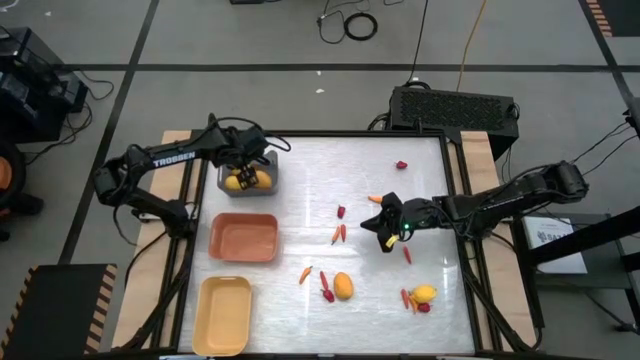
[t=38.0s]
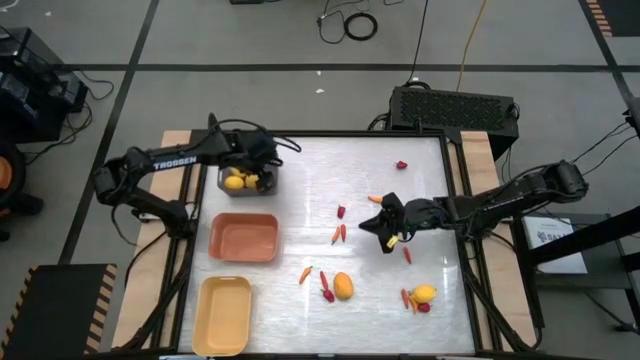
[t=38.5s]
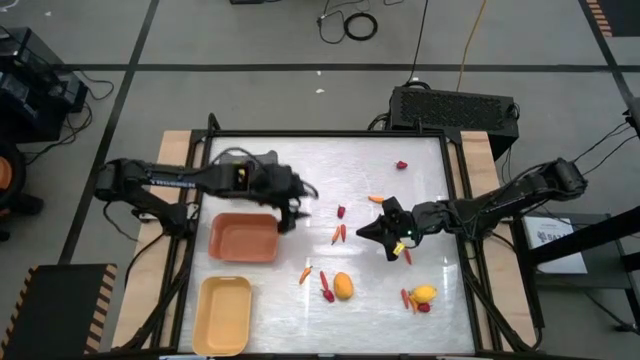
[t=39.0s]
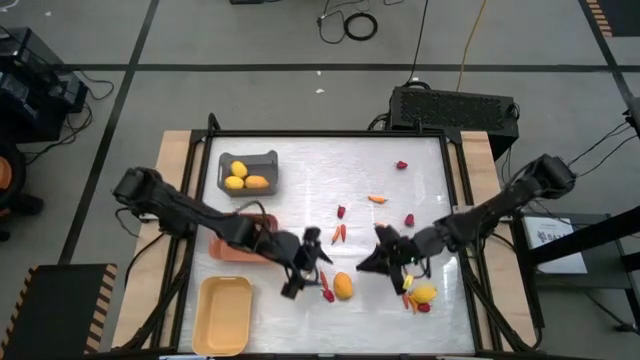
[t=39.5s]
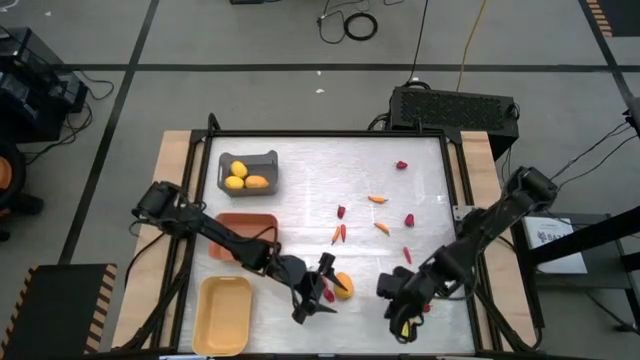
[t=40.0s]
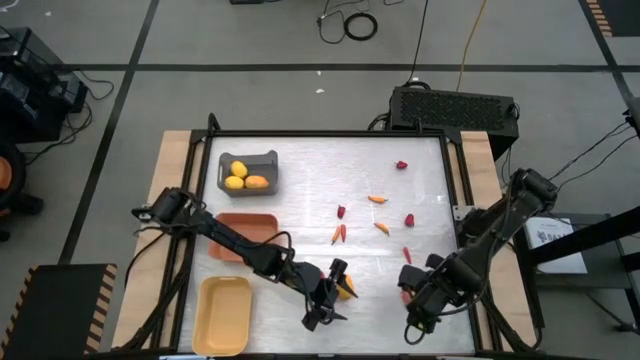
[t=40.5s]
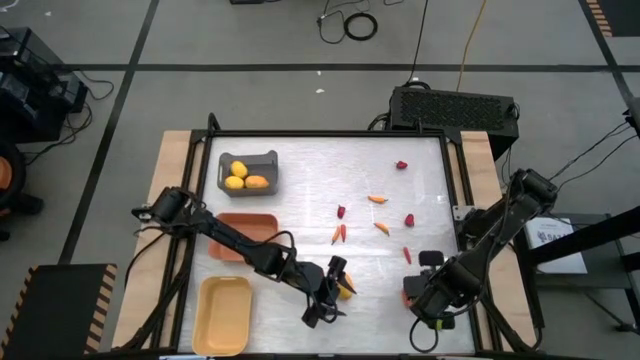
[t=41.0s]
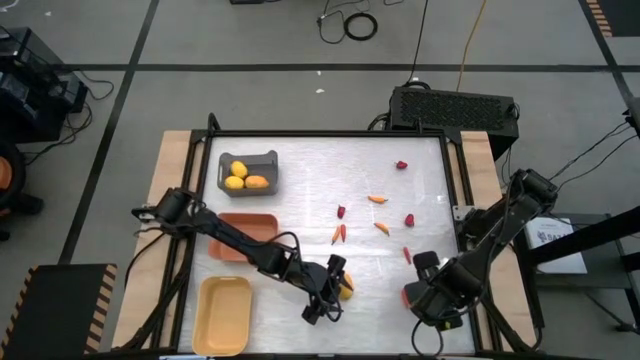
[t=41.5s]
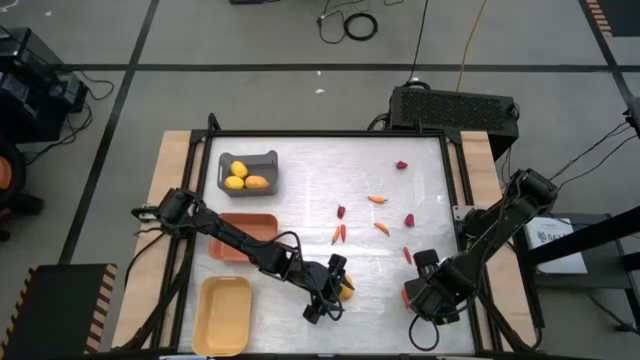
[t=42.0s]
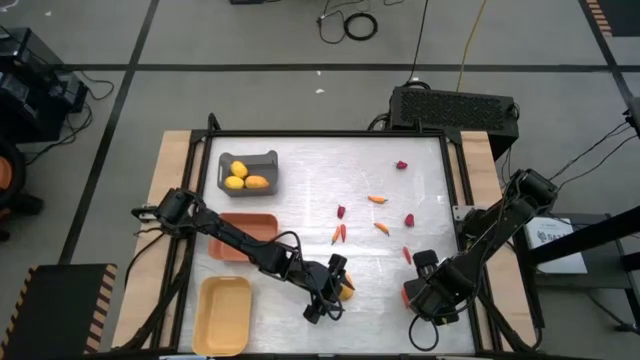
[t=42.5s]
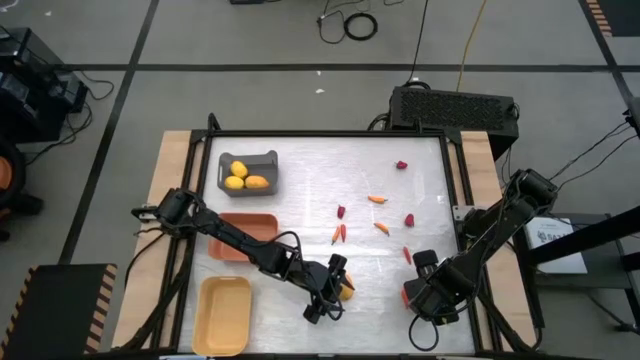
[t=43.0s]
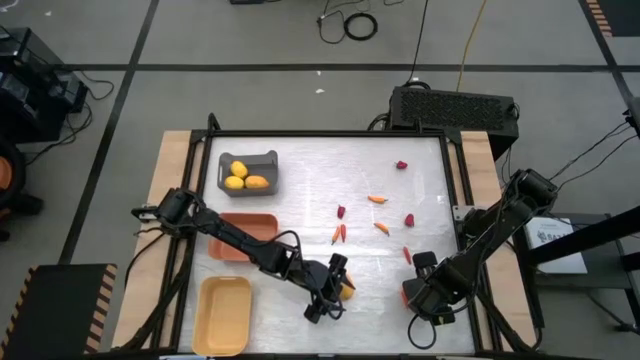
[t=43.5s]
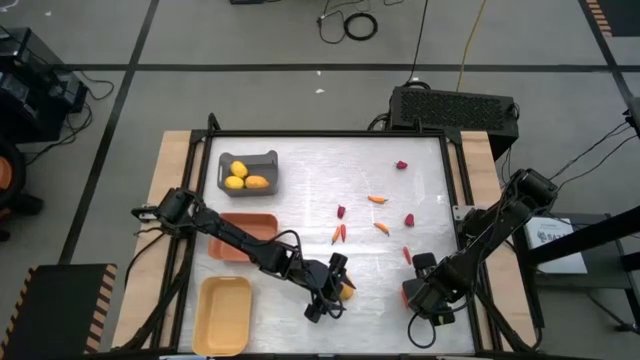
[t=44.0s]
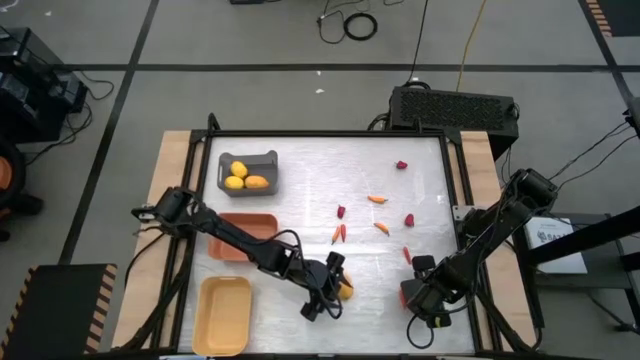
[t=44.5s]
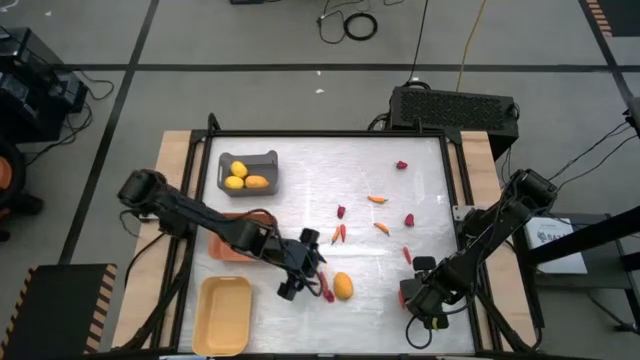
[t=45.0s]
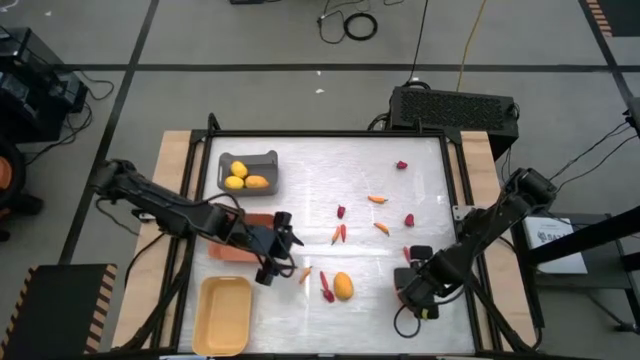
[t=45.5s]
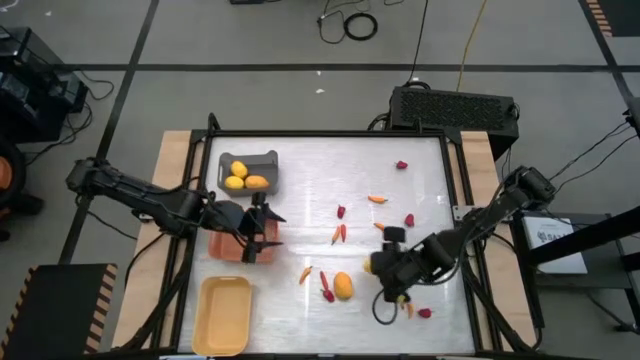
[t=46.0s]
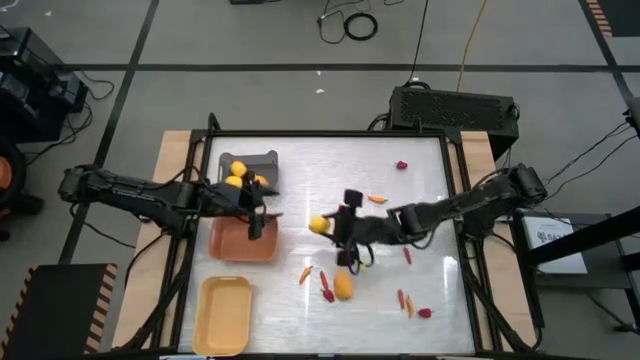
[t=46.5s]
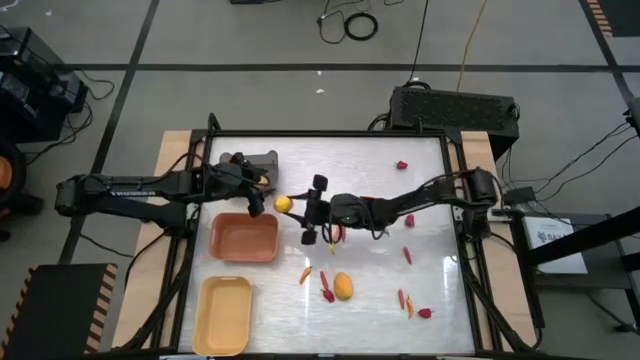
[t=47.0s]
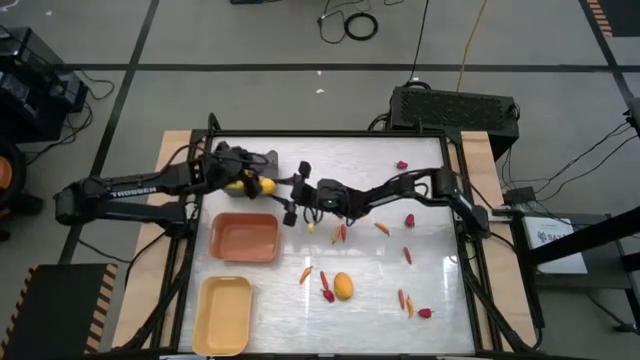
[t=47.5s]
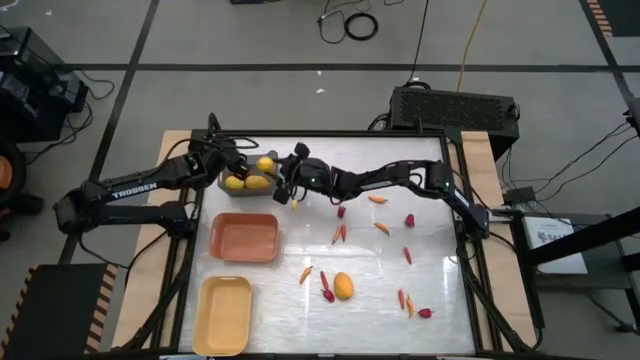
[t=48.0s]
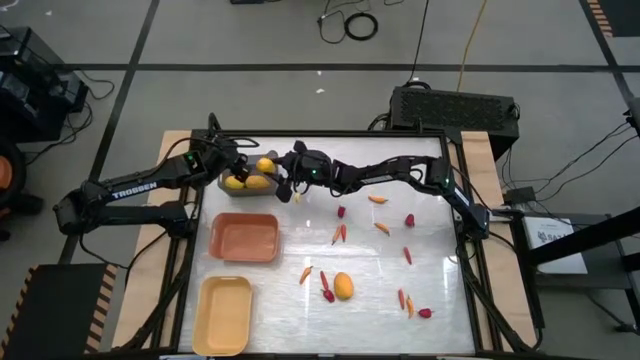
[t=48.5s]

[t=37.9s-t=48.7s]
Task: Sort produce into baskets
Put the lemon into the black bin

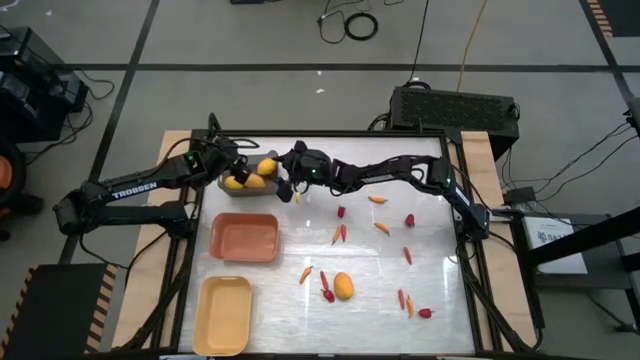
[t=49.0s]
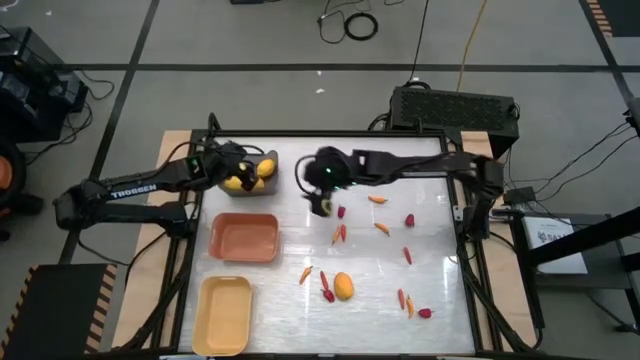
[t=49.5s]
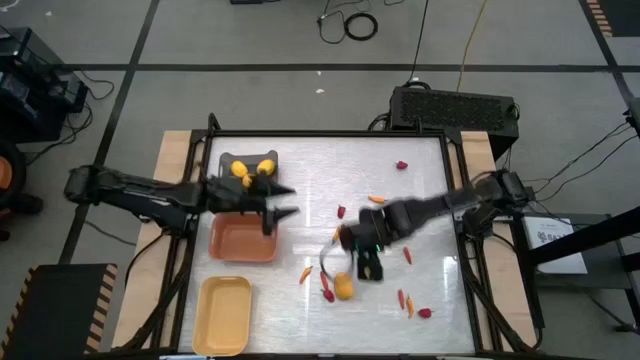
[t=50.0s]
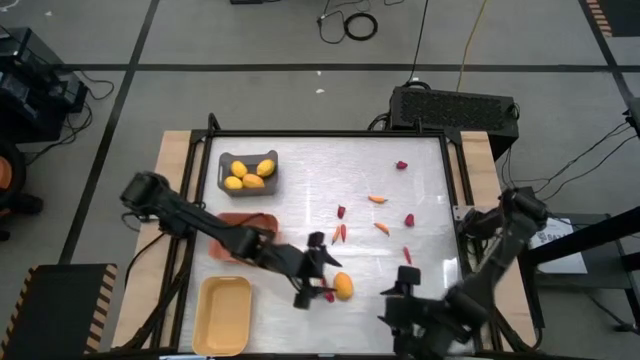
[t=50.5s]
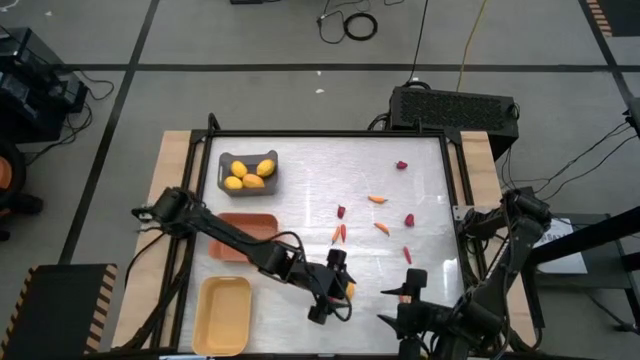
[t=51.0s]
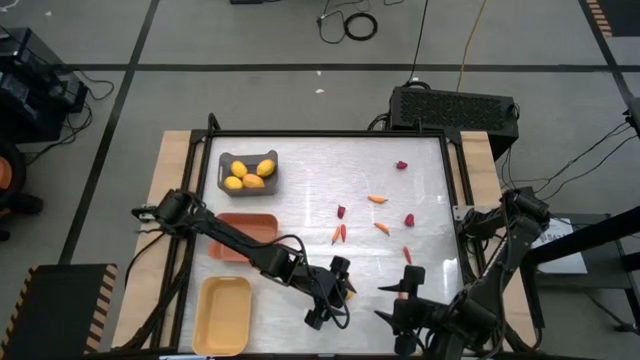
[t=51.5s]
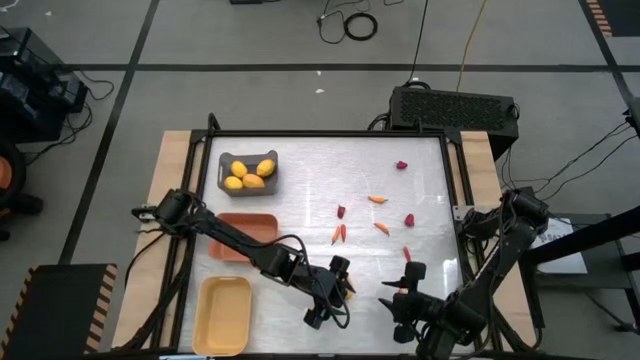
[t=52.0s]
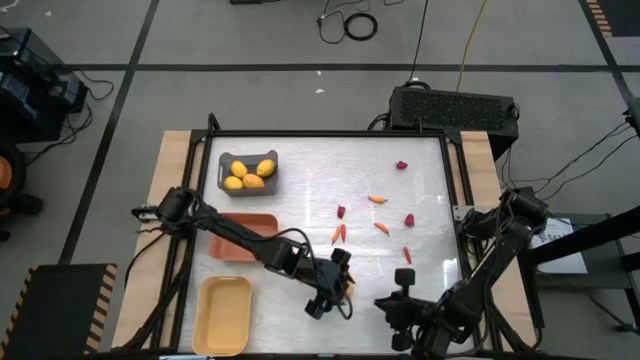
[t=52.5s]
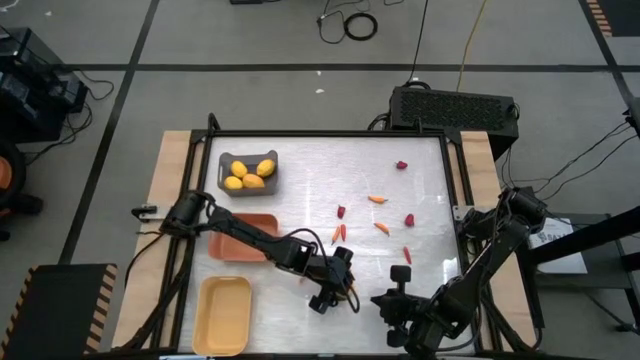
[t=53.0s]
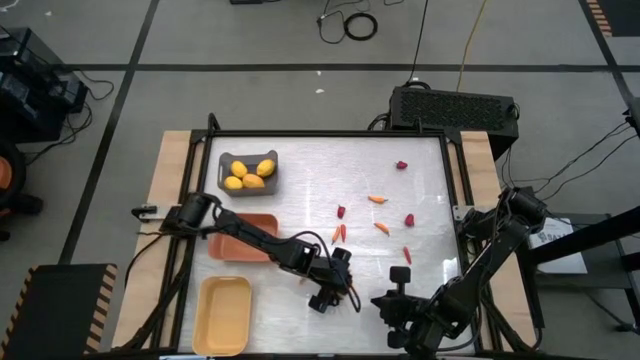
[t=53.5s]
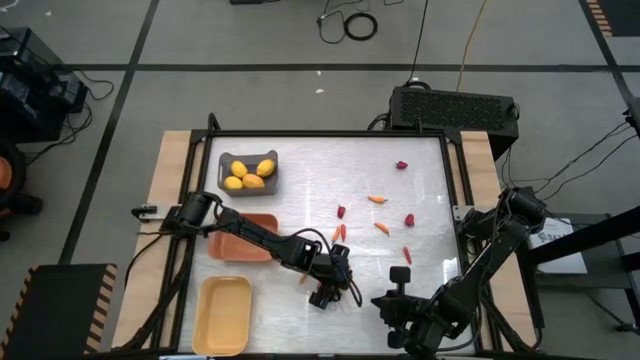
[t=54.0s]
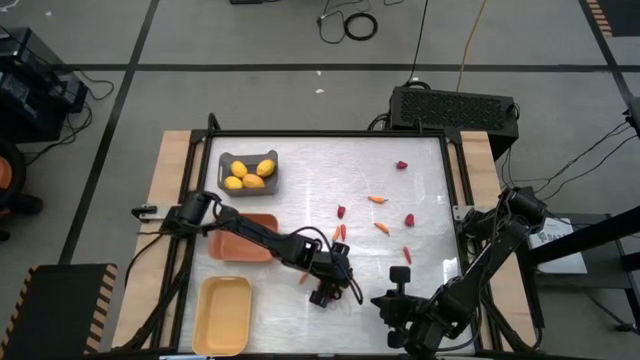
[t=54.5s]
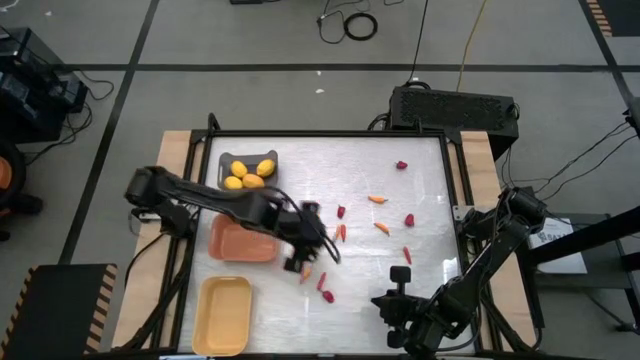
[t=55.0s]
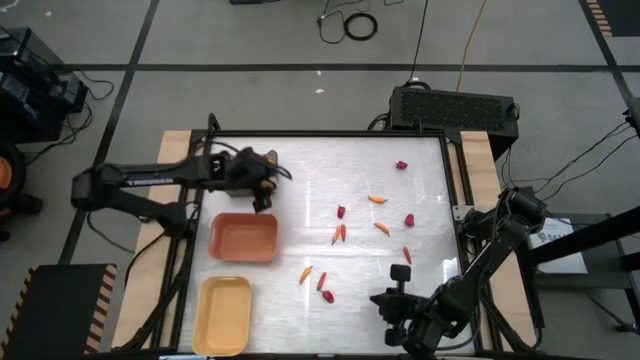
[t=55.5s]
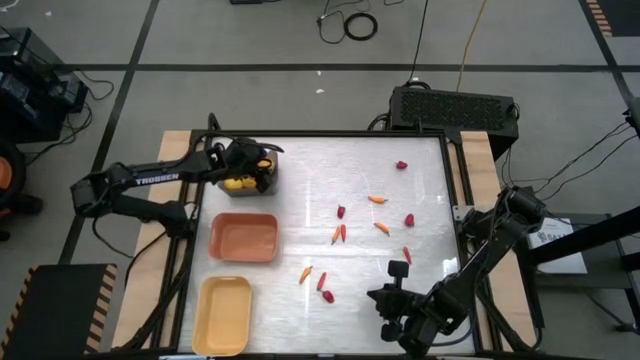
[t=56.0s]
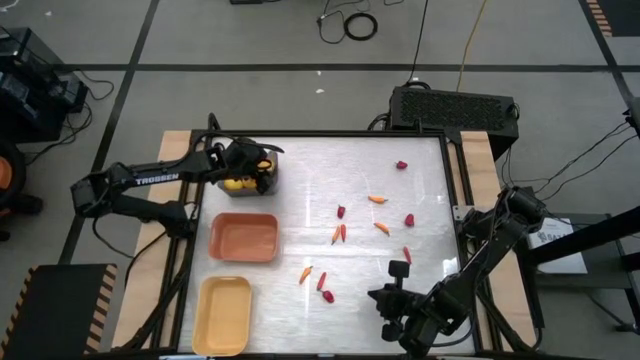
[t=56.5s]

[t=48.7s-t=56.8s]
Put the lemon into the black bin
